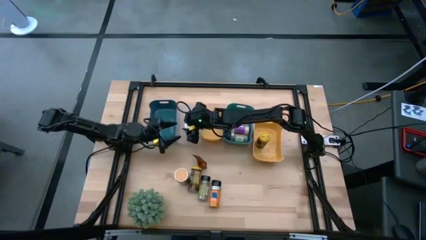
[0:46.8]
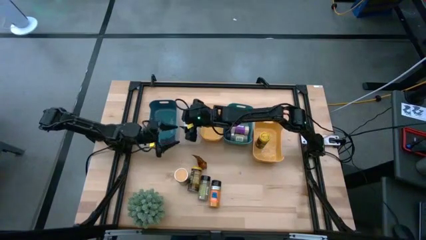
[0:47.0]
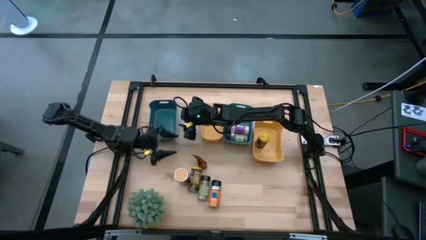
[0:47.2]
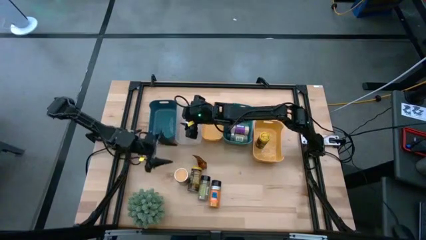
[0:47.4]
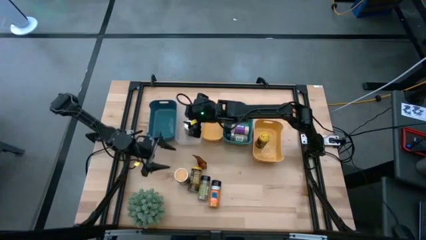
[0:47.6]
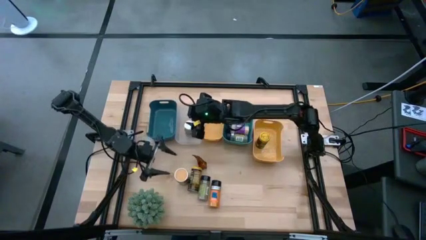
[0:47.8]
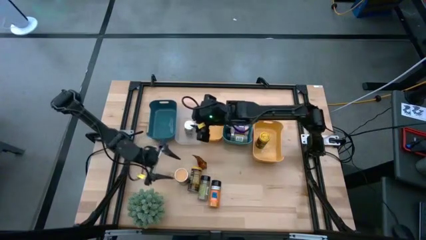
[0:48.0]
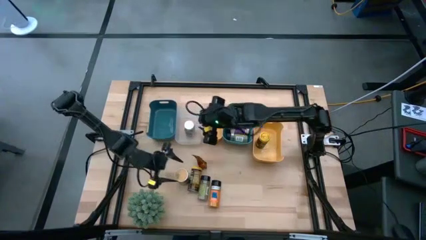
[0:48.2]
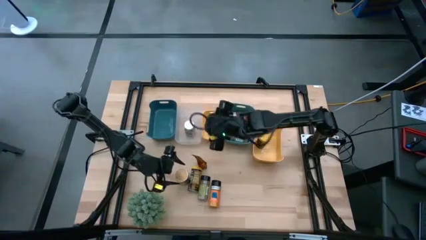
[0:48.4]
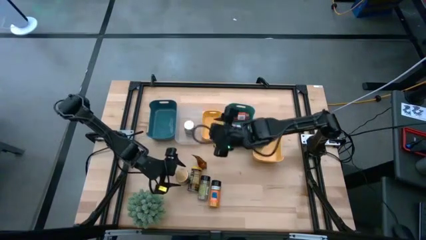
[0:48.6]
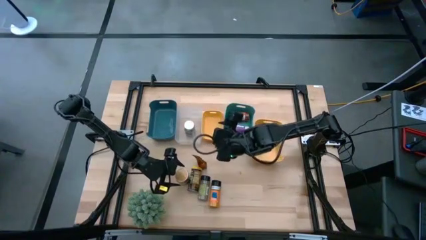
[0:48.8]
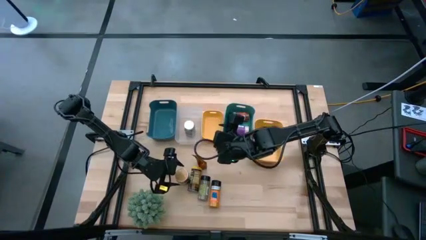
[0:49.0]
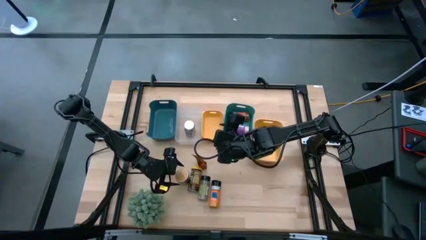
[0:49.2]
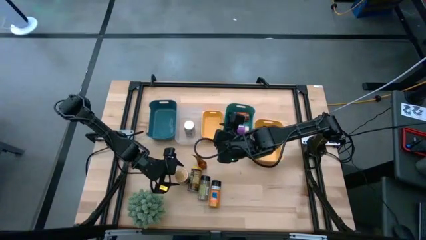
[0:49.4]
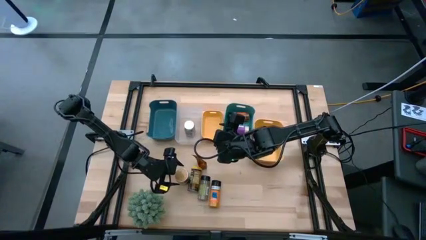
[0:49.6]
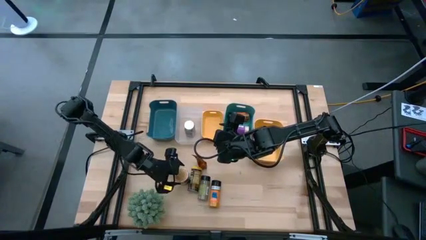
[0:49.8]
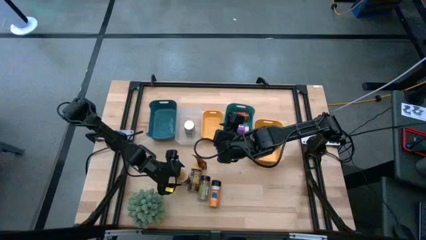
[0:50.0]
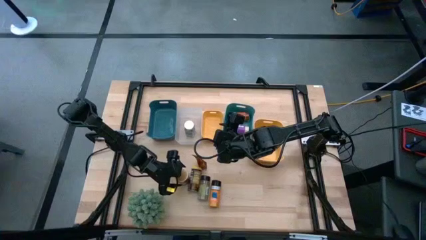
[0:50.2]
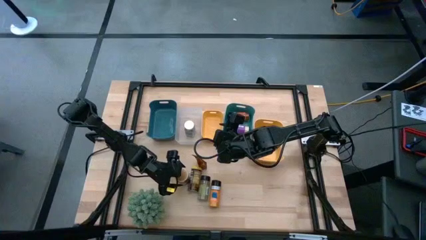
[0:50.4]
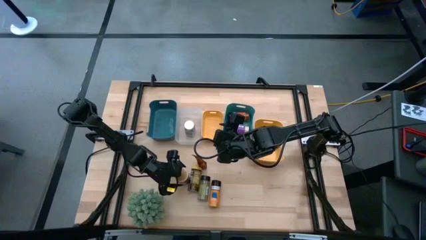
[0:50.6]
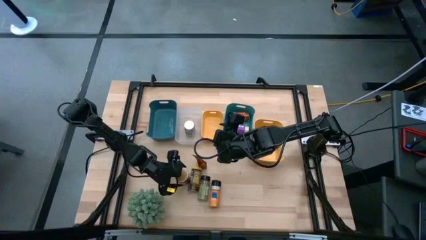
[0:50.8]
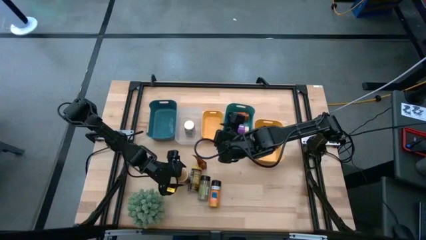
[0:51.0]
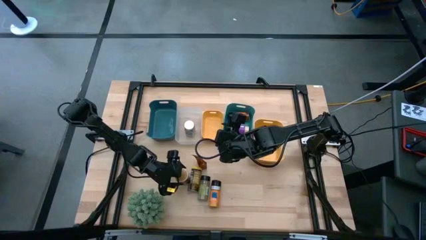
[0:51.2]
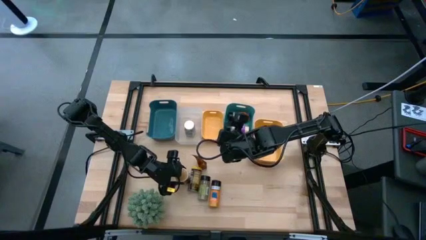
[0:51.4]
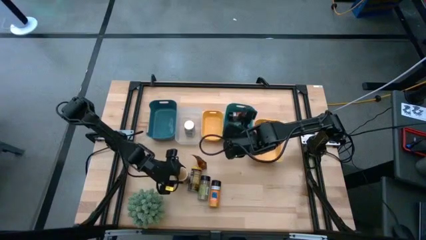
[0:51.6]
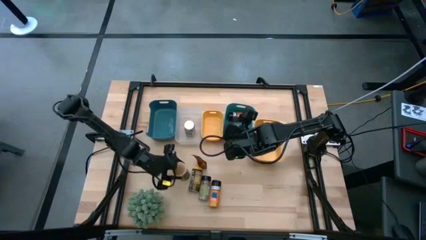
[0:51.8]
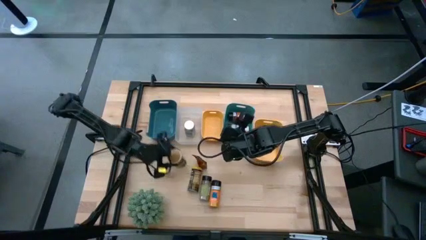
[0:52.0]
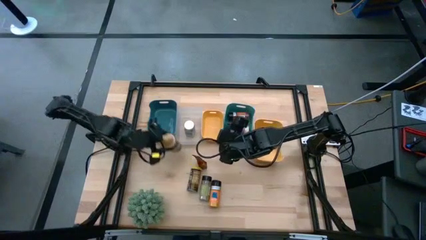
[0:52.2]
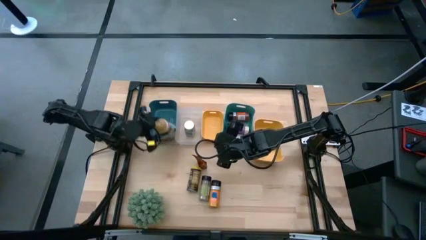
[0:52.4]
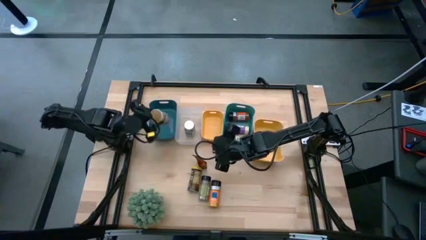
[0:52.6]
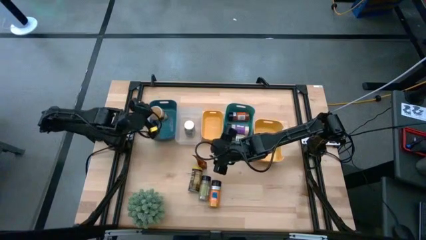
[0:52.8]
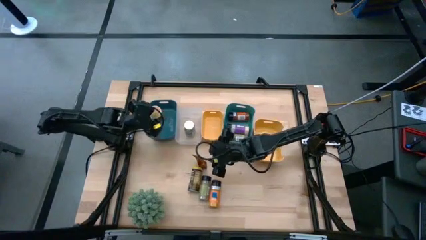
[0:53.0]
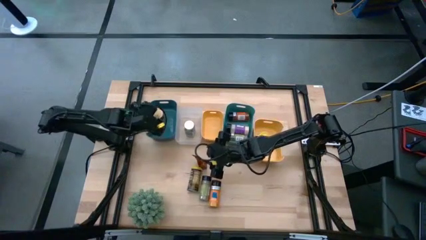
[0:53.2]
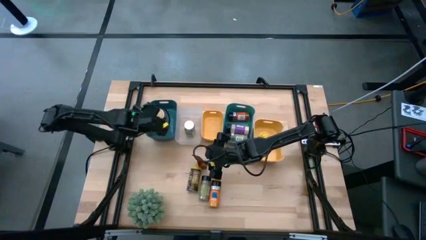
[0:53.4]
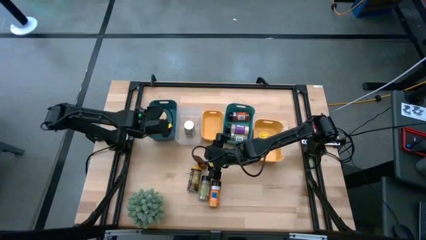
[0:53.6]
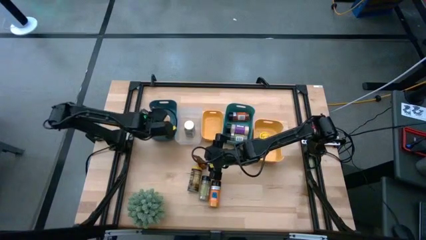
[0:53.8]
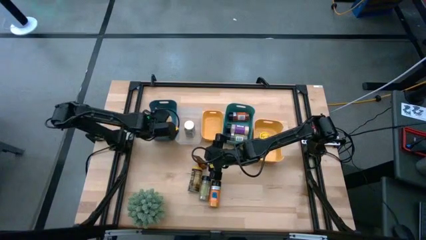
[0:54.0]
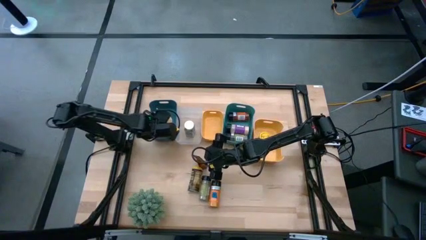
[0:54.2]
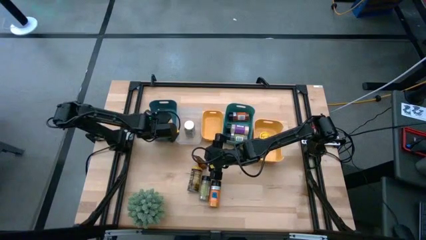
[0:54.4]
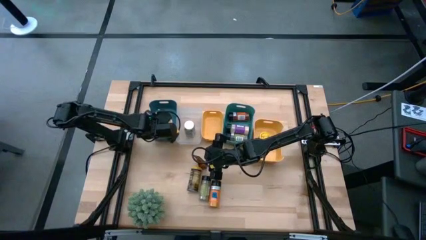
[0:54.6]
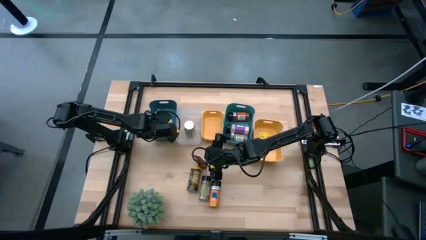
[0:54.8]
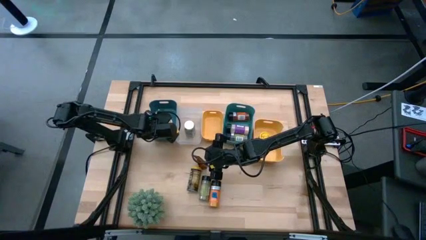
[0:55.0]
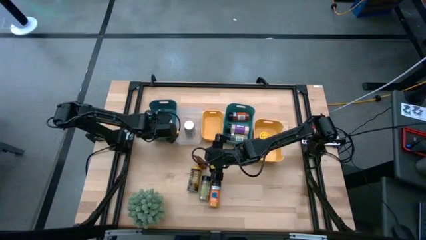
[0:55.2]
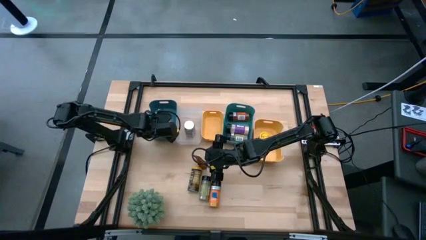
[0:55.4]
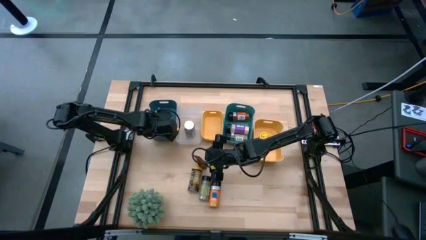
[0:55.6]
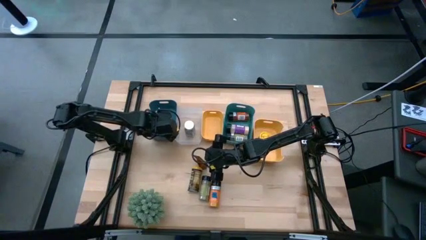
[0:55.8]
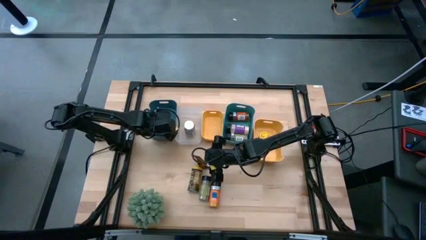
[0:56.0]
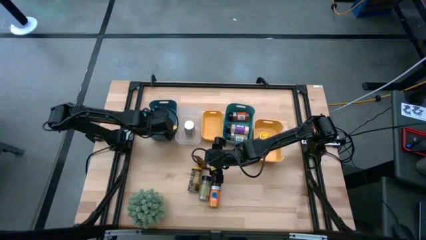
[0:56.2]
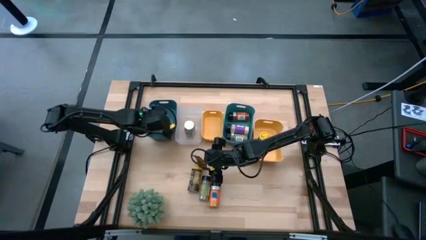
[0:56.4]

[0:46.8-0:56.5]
Task: Sort spices by type
Put the gold seasoning bottle into the blue bin

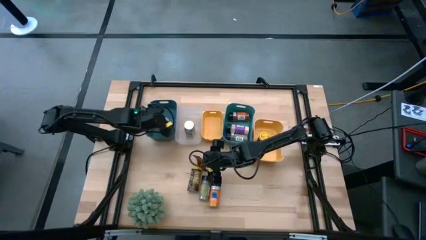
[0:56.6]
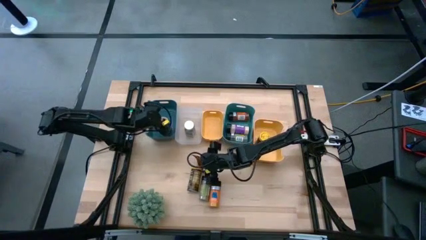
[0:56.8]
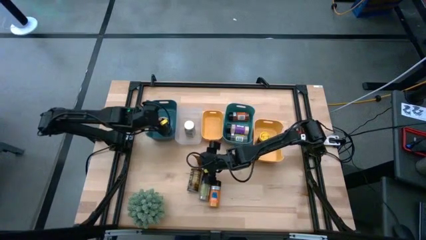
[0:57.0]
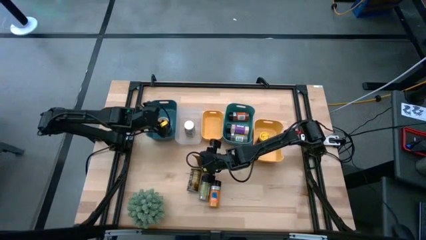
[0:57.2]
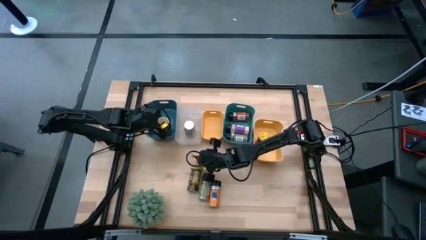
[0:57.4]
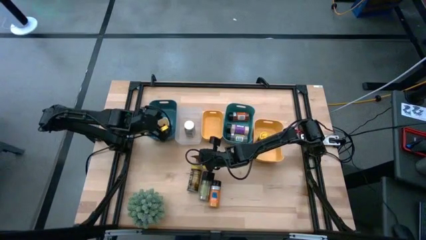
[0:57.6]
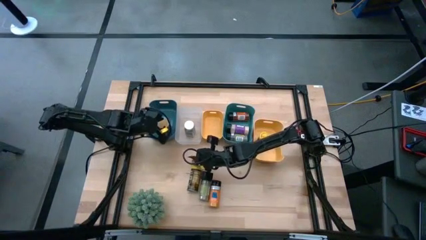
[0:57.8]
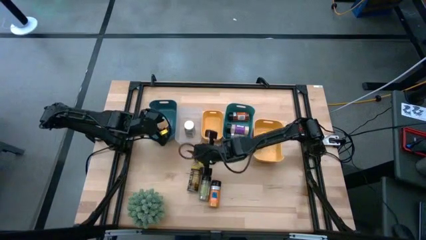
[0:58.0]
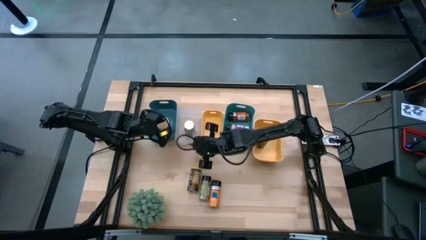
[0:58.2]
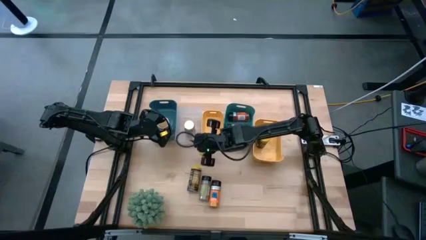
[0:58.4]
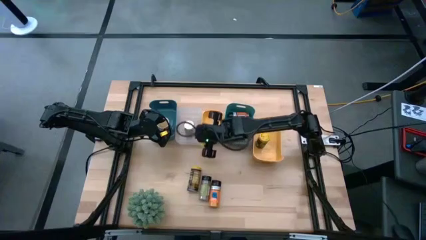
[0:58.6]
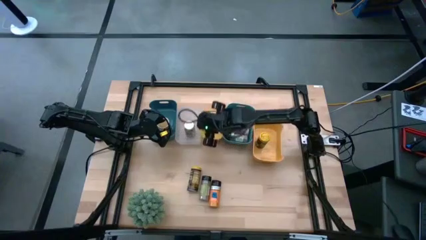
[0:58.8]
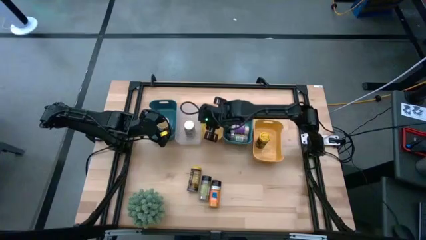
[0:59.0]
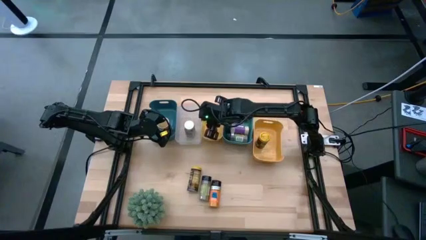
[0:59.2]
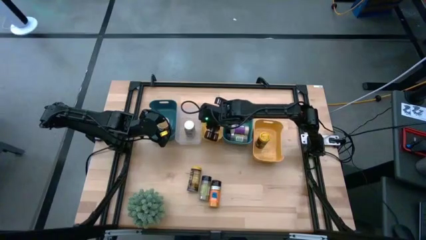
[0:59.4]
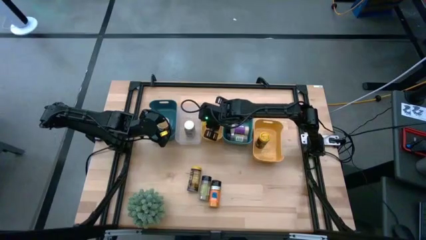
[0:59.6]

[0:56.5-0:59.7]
Put the orange seasoning pack into the left yellow bin
